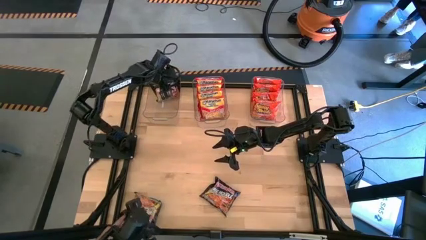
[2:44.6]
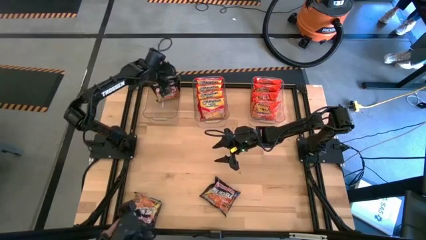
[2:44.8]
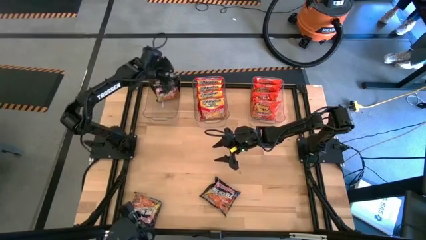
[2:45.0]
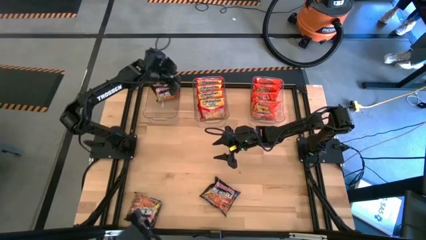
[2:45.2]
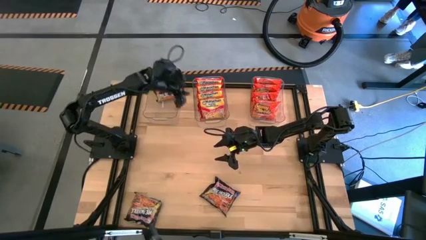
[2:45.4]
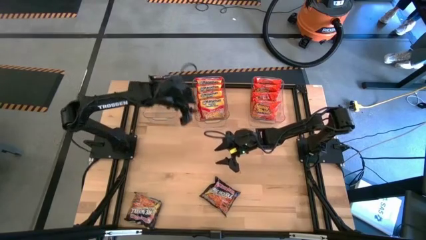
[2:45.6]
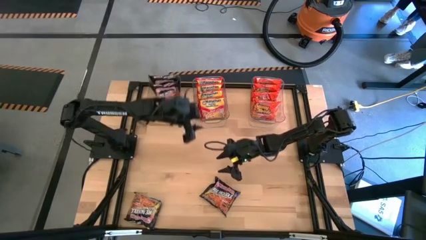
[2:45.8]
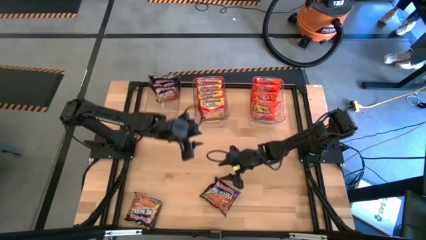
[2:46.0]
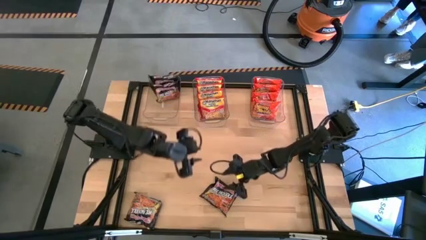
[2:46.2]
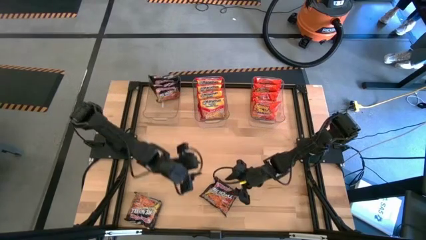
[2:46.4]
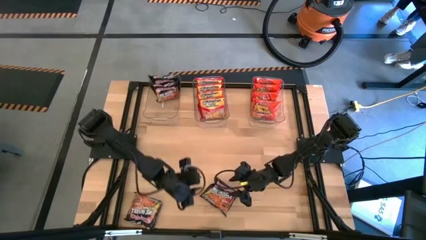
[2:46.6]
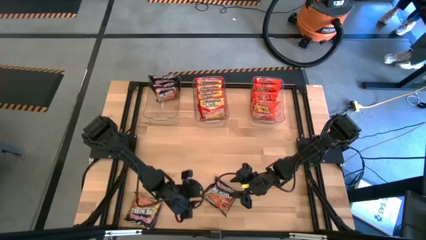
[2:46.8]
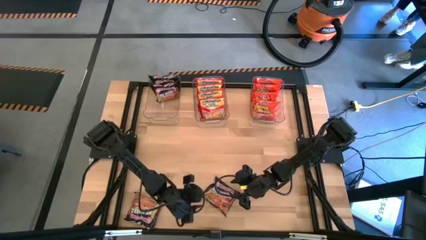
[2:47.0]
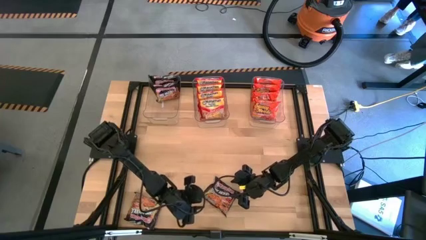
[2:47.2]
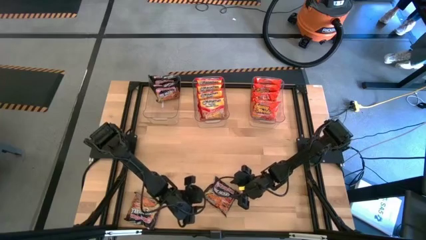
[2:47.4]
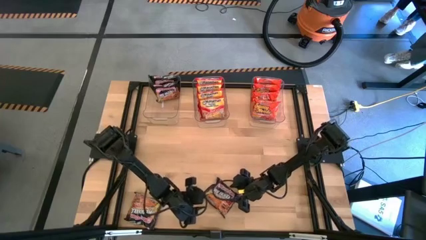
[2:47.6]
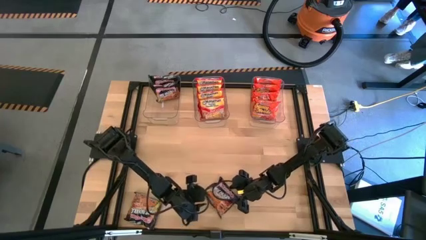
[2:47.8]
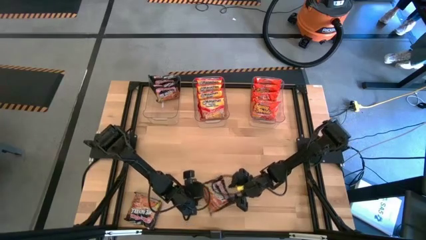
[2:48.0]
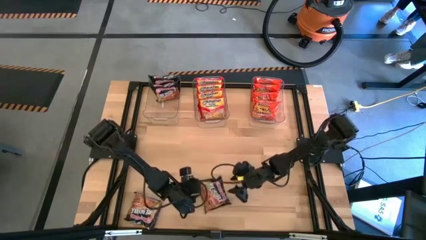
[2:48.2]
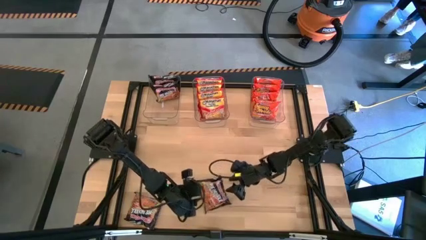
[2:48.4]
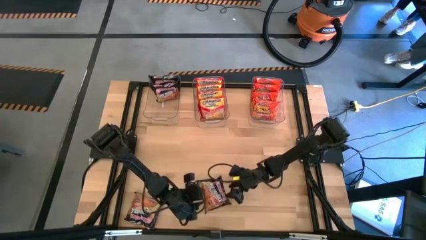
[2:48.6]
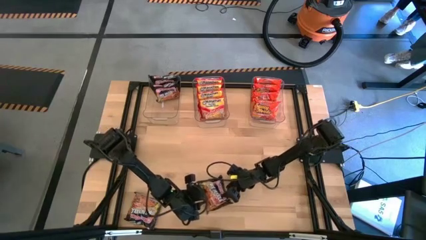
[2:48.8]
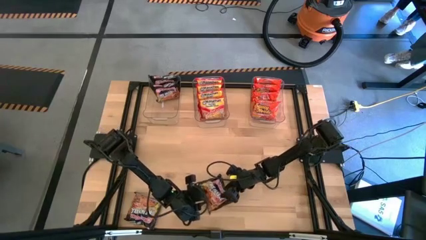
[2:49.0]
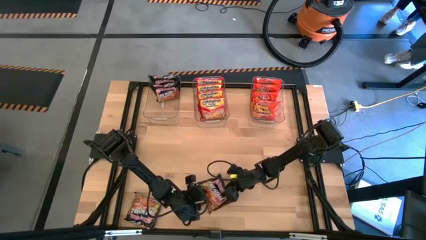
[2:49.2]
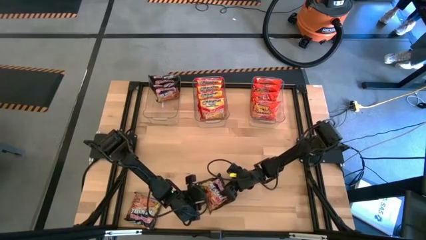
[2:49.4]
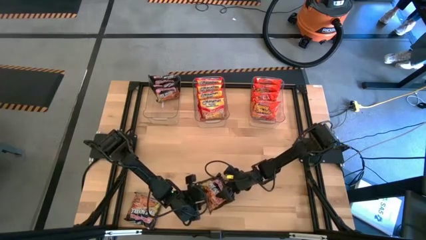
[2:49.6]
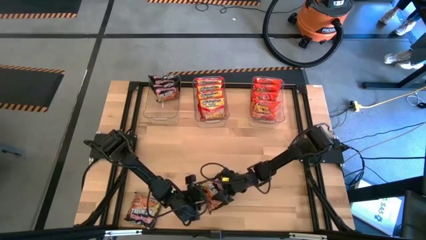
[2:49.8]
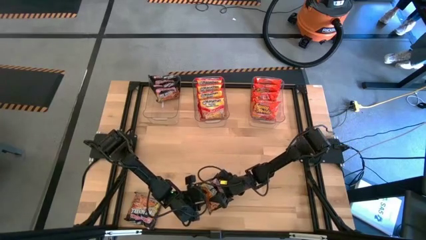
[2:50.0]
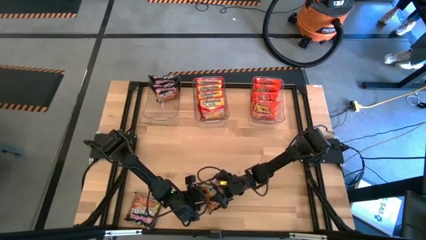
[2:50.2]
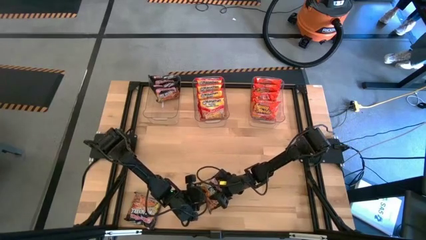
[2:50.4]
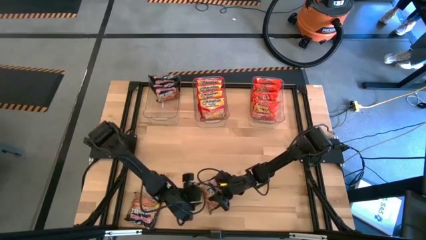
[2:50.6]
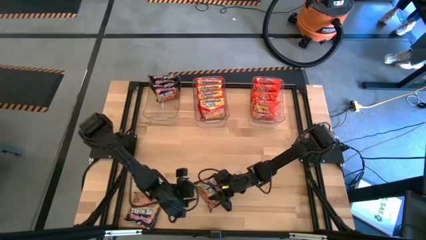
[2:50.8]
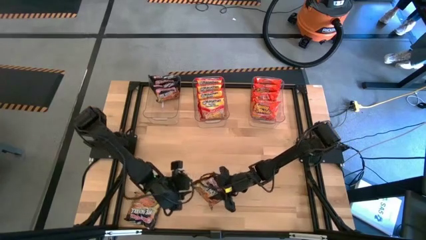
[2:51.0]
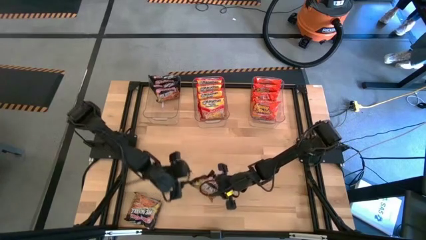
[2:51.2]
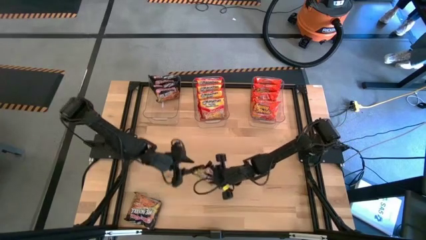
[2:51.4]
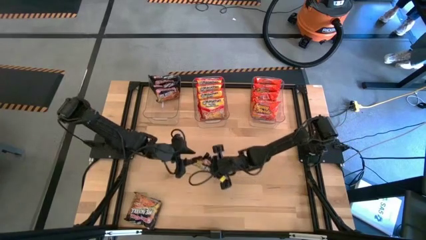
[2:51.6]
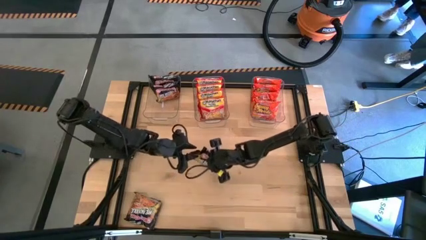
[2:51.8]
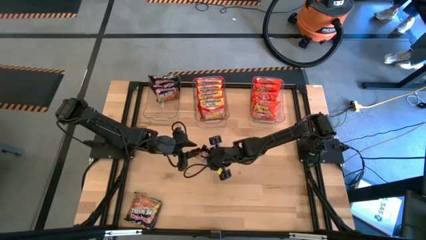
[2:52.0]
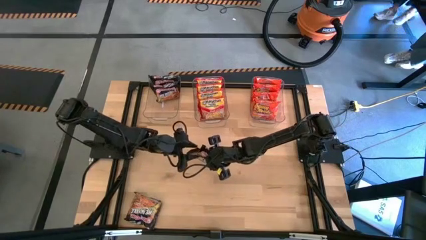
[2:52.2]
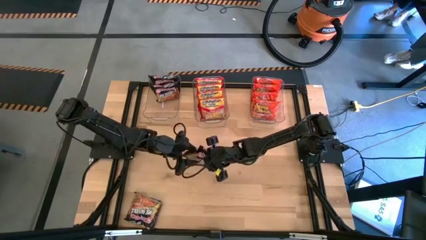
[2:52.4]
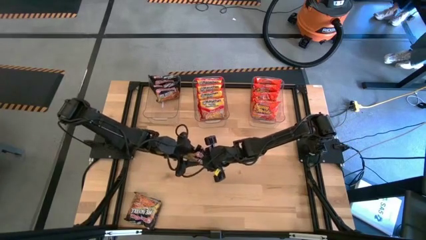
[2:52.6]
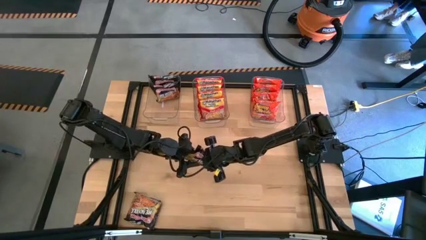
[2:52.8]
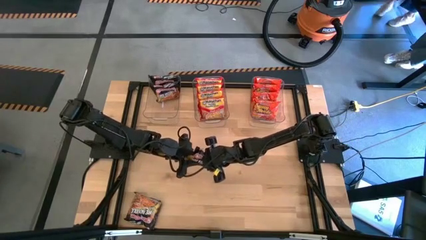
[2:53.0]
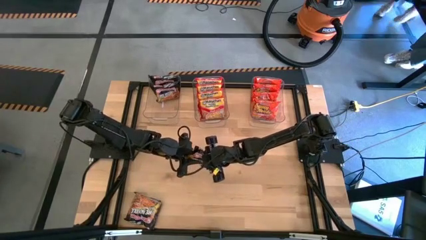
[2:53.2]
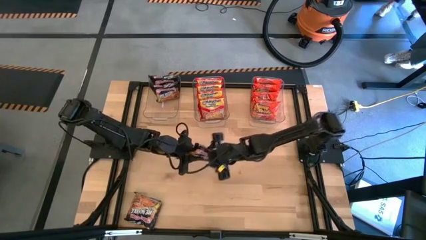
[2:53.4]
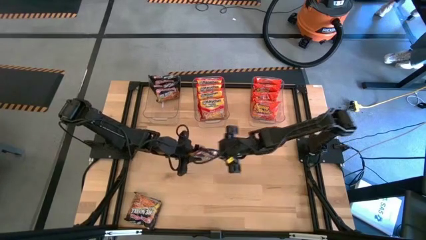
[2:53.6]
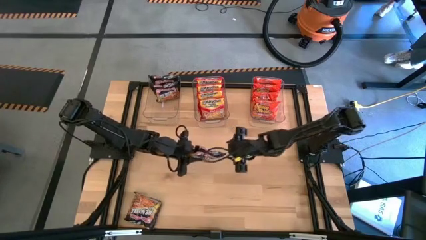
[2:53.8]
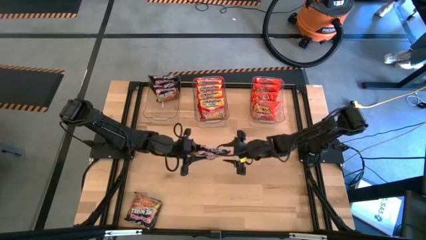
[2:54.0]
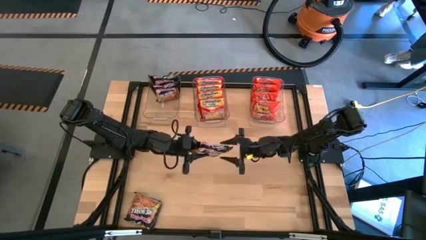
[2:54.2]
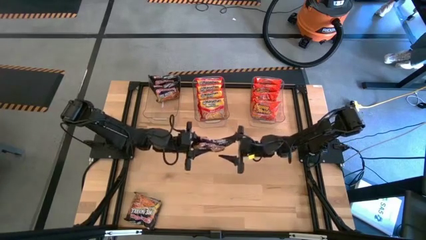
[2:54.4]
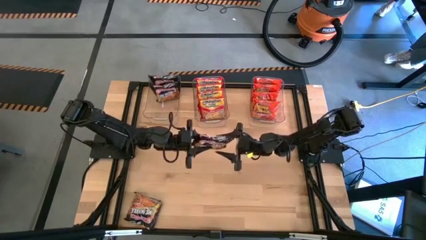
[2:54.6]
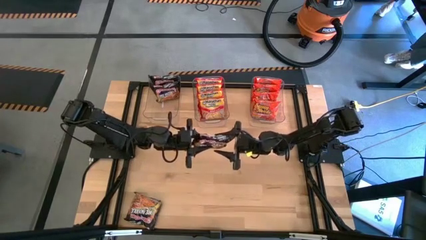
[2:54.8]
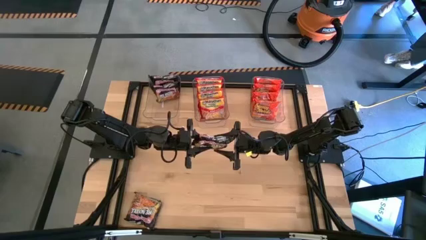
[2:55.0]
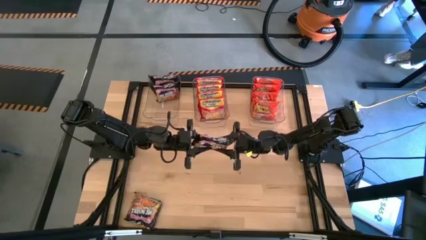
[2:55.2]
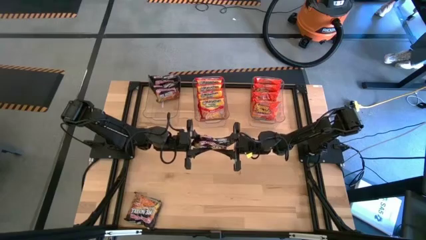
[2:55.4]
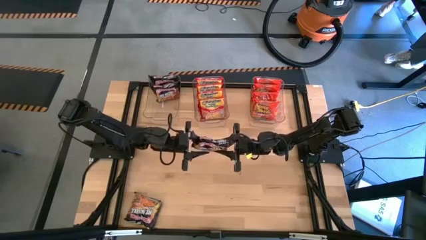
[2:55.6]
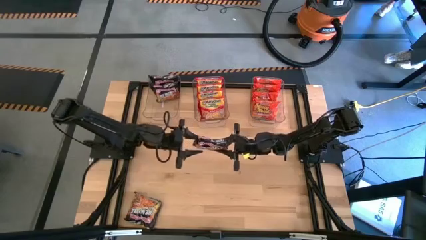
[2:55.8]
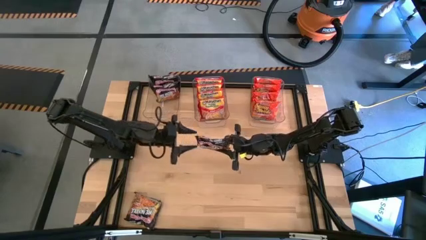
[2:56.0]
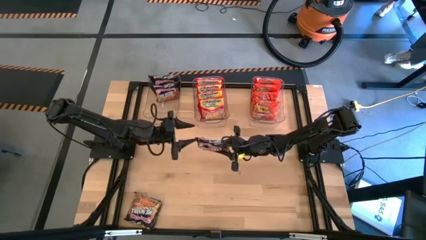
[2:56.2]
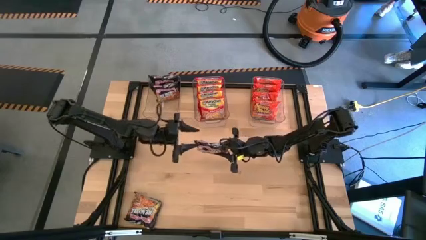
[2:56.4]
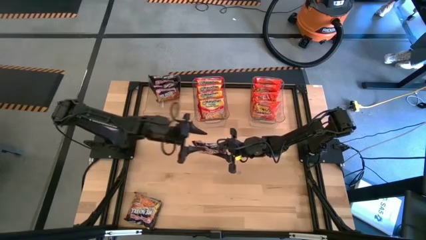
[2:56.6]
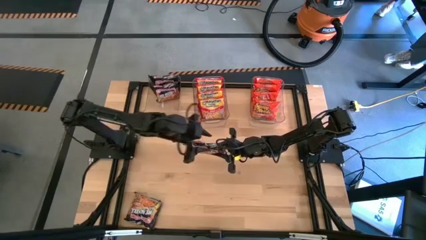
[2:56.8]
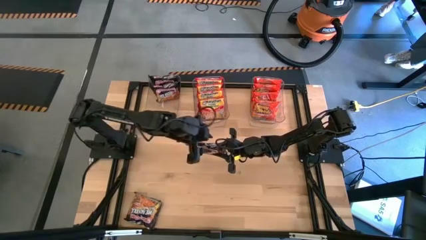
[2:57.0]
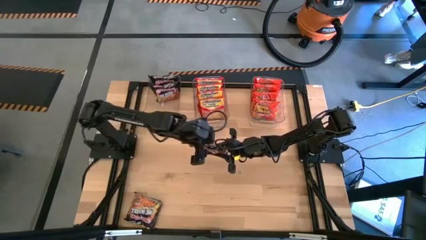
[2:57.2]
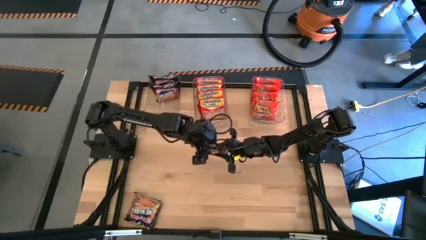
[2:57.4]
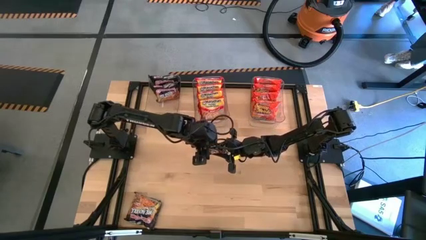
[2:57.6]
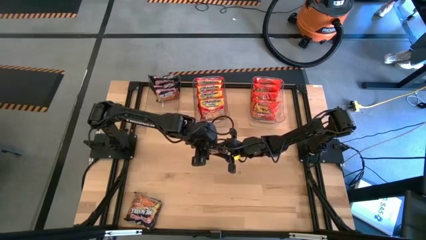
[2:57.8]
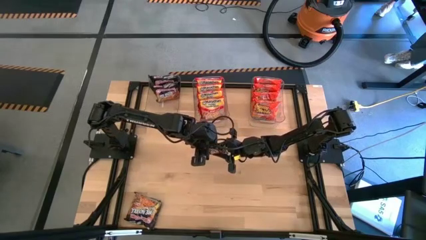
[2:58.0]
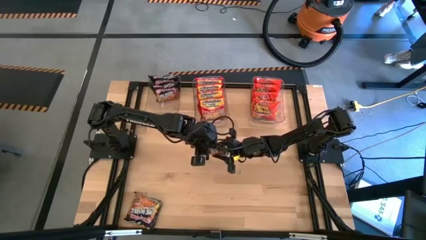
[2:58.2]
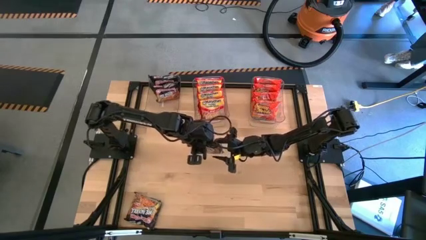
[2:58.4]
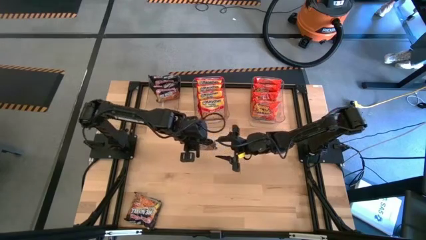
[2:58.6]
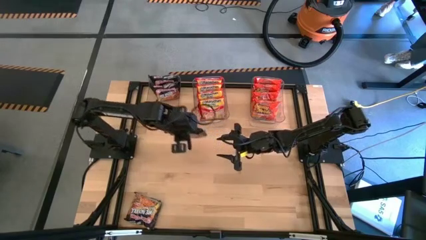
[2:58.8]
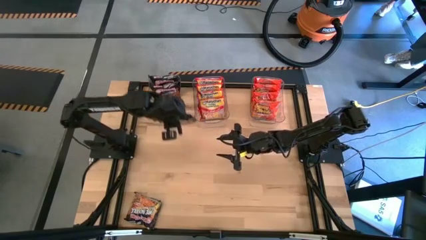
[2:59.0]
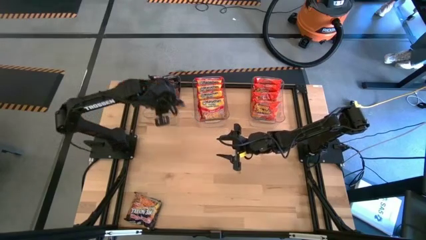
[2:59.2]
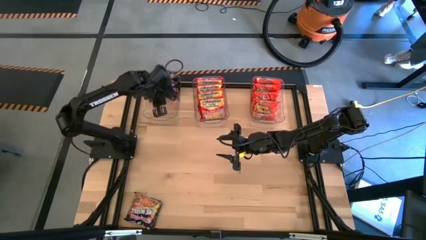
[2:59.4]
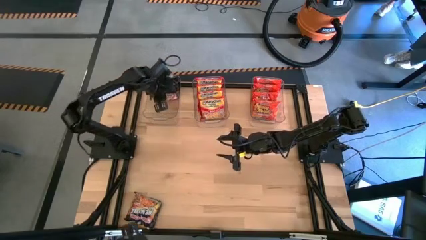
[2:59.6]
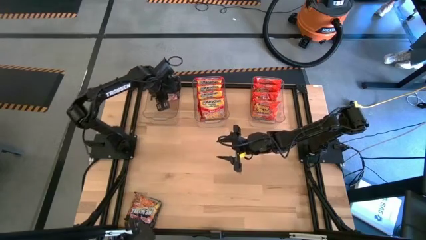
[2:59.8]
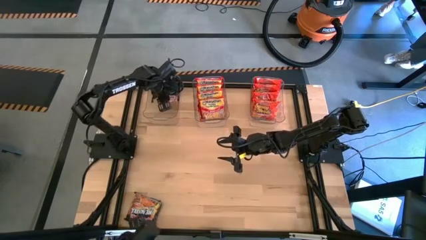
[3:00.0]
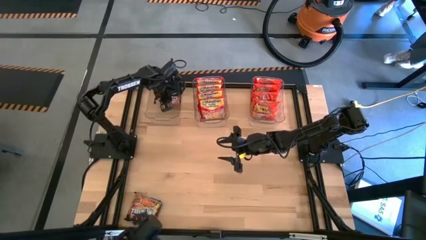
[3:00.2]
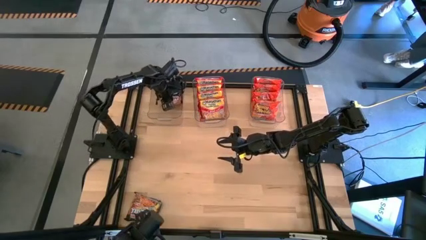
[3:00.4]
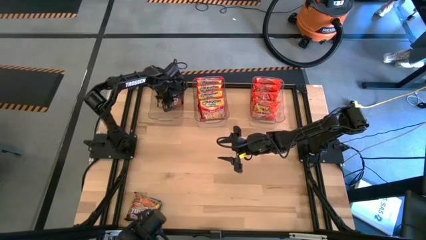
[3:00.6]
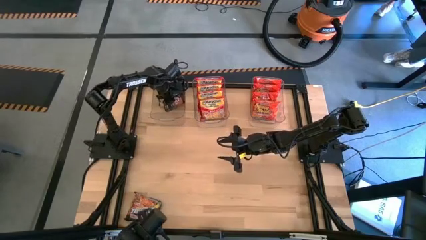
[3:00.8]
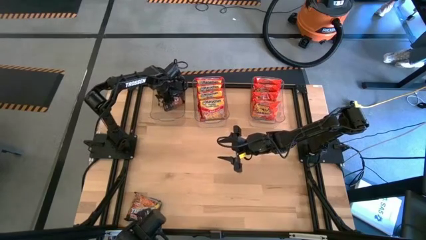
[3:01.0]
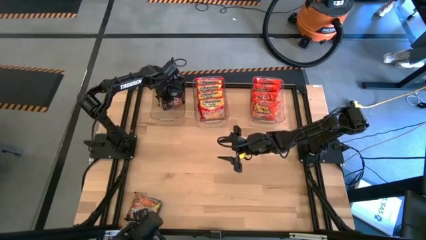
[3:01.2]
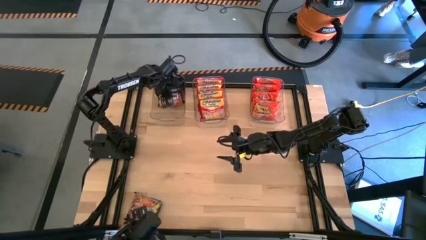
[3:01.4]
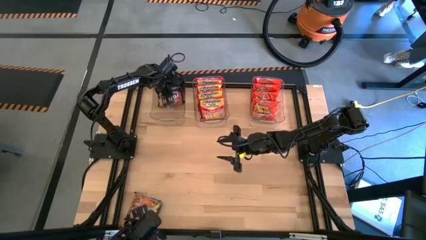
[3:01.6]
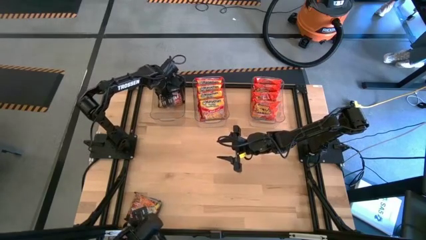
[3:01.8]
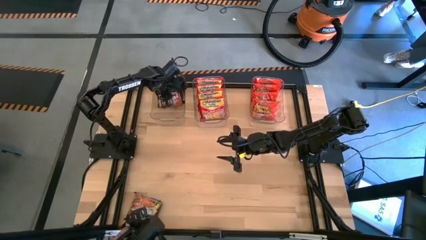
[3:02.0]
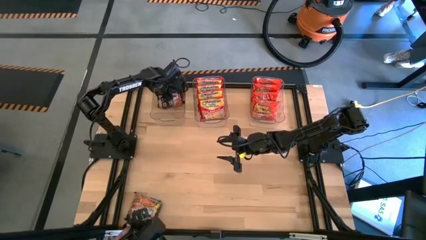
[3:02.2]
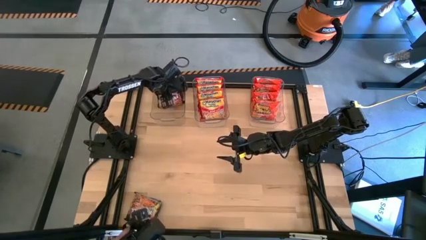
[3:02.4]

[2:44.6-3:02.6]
Task: Sort Maruchan noodles
Put the right black noodle pack into the left transparent bin
